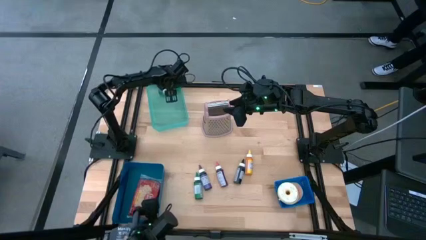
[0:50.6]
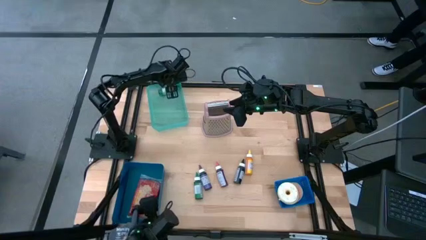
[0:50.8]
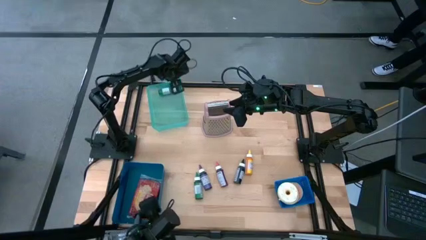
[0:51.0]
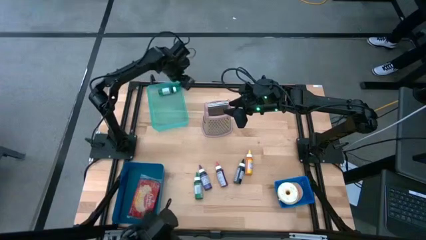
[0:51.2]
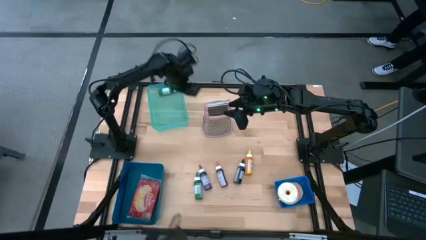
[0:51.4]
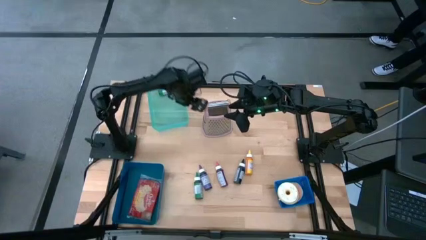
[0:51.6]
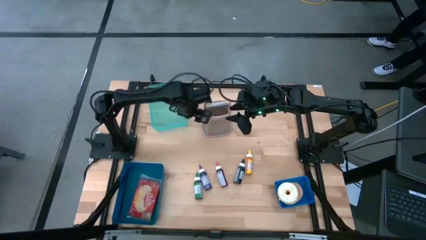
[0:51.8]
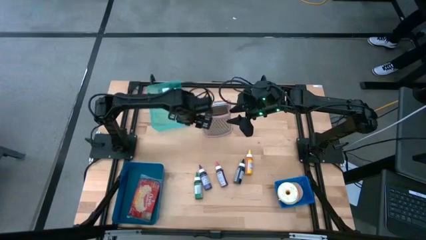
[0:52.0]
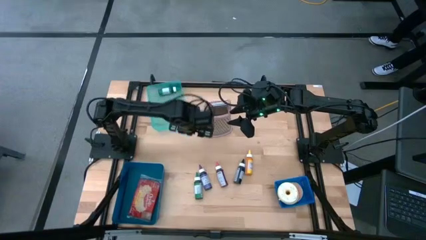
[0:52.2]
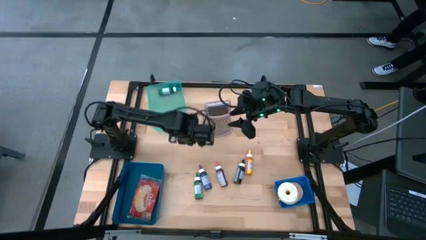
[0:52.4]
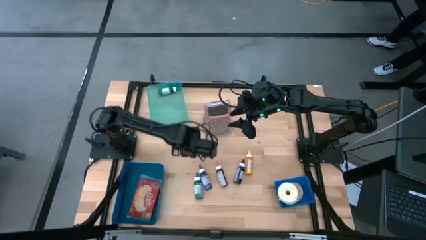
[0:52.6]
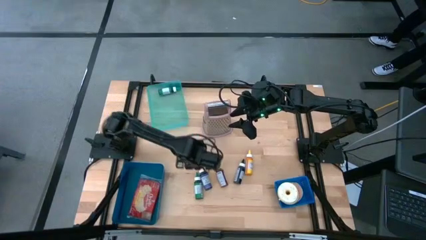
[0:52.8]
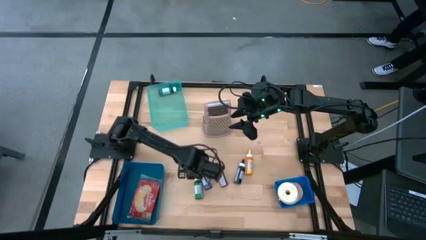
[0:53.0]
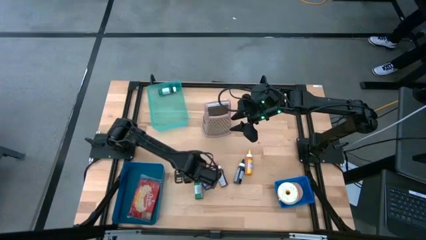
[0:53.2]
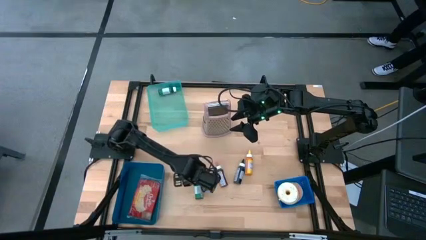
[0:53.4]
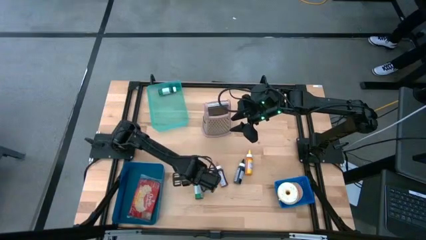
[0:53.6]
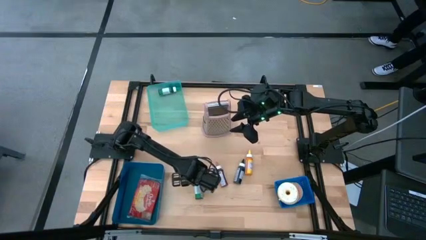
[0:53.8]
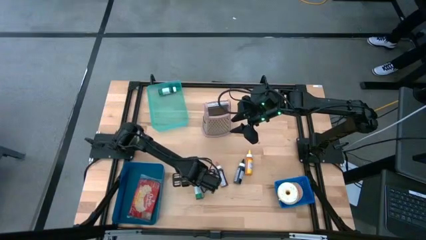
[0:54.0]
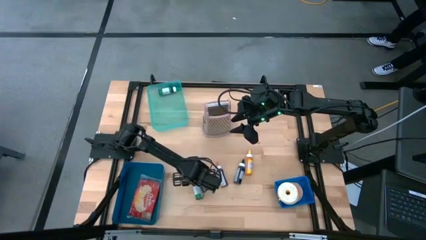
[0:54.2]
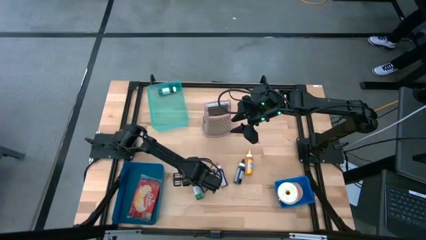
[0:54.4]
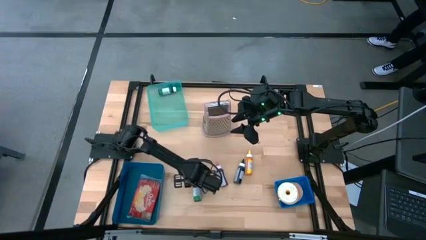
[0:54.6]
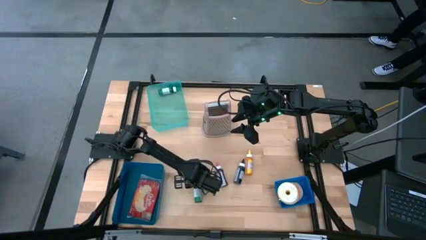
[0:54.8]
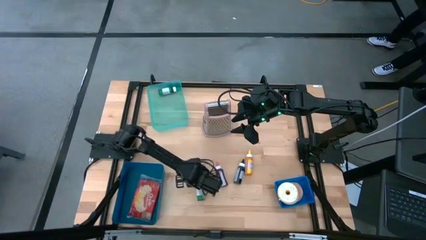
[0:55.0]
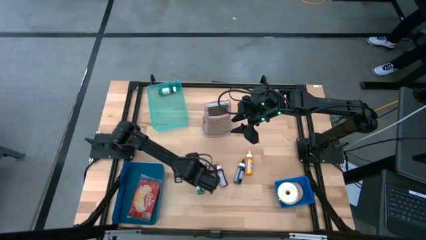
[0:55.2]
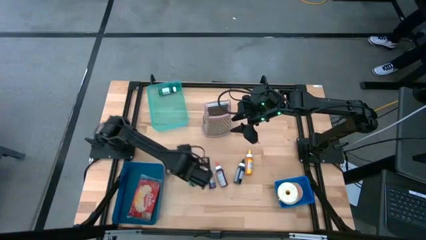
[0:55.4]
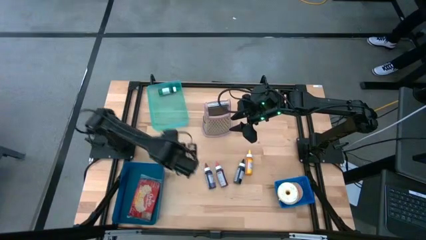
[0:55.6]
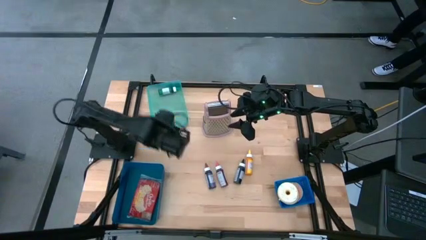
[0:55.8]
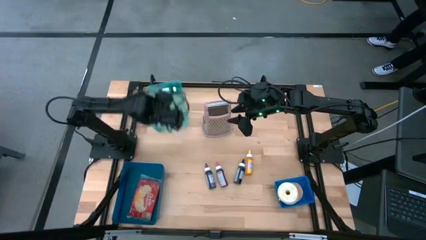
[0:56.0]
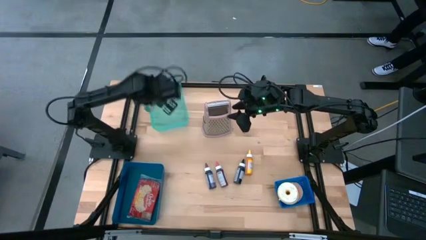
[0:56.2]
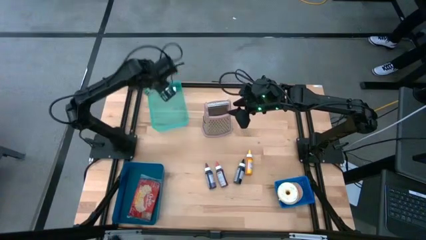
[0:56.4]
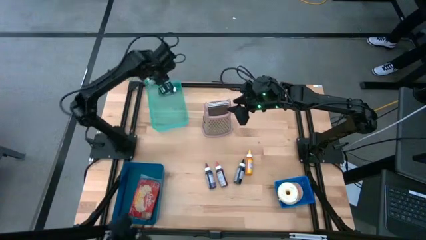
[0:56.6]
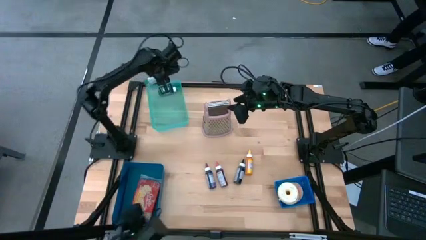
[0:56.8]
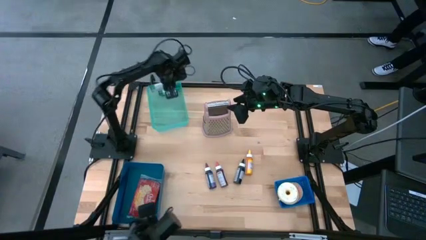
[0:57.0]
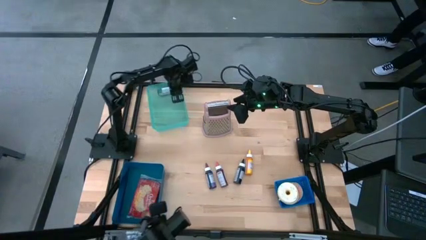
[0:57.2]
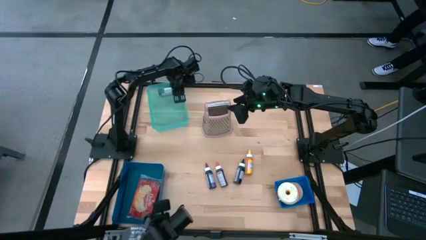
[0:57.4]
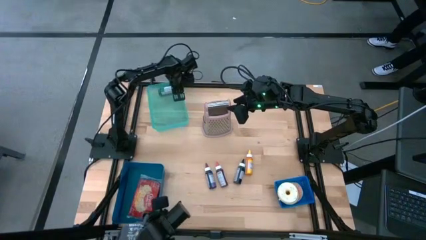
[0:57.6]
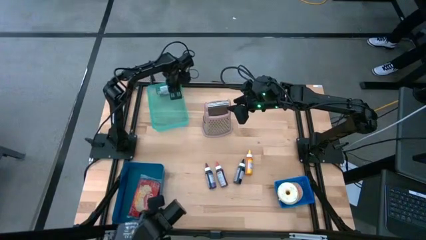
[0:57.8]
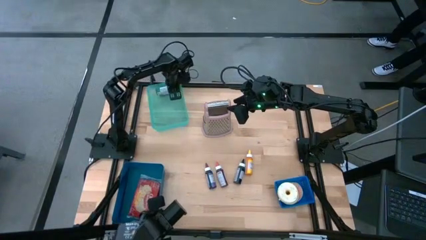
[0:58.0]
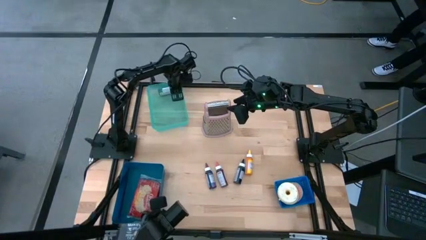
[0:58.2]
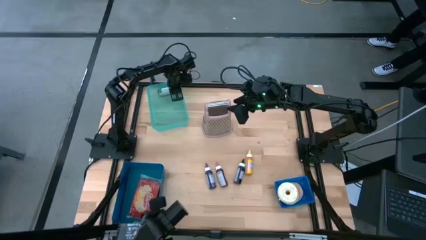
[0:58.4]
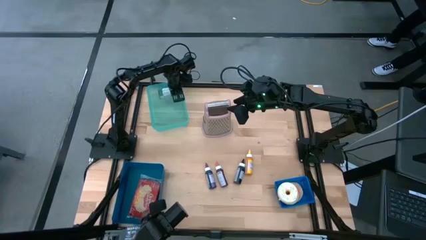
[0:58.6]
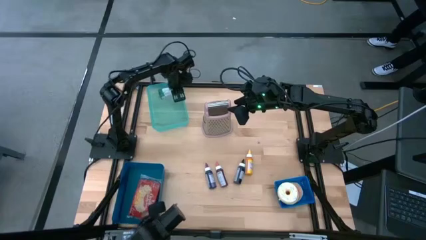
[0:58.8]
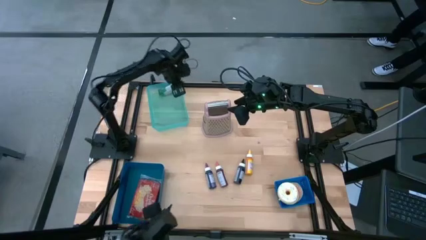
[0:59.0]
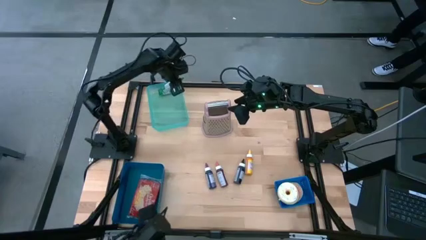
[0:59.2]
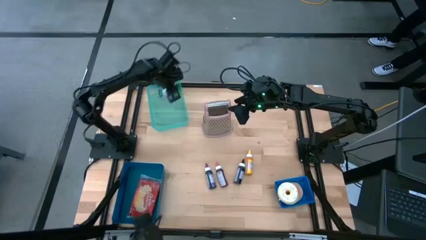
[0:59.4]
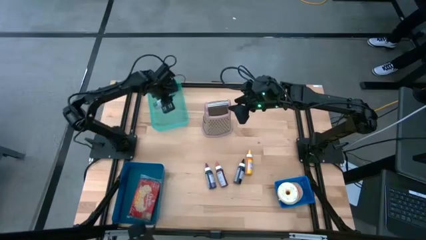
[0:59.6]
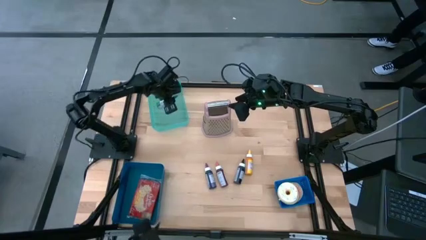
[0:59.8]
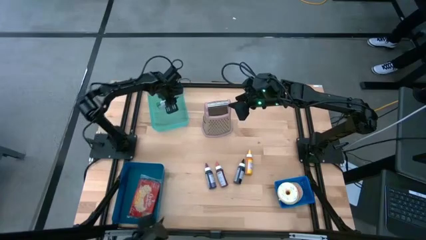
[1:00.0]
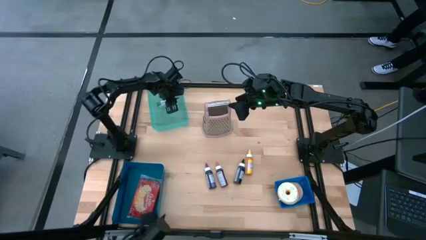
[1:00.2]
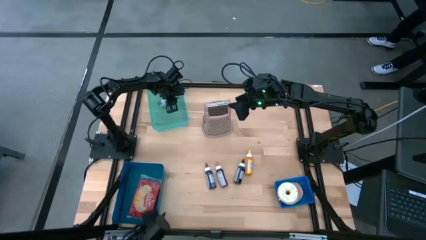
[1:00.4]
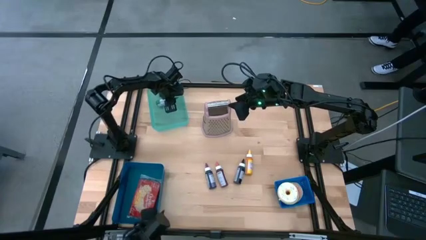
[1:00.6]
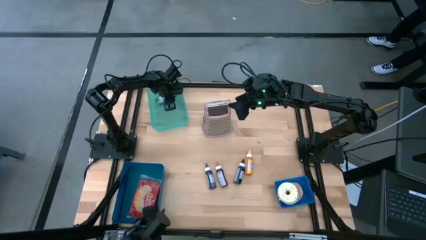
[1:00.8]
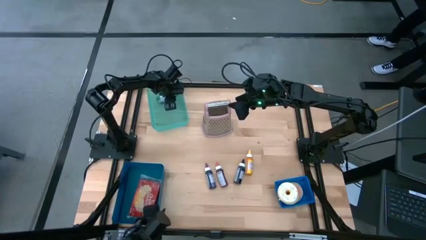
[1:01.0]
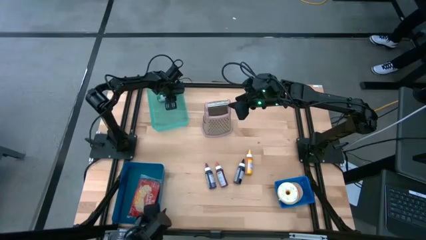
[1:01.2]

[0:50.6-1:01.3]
Put the green food coloring into the green bin

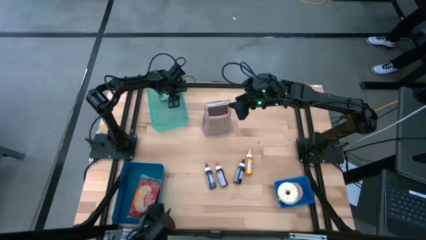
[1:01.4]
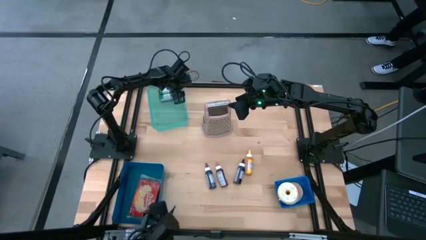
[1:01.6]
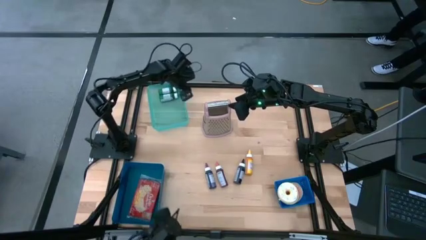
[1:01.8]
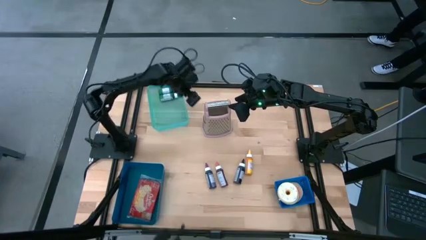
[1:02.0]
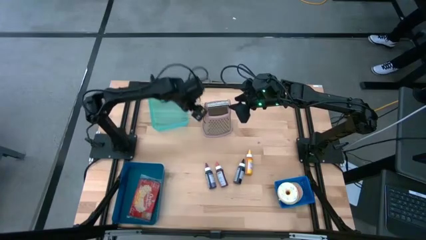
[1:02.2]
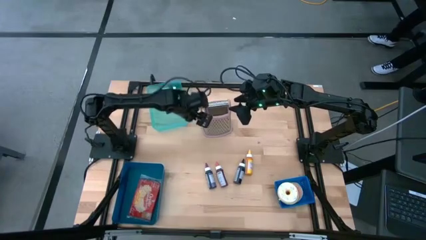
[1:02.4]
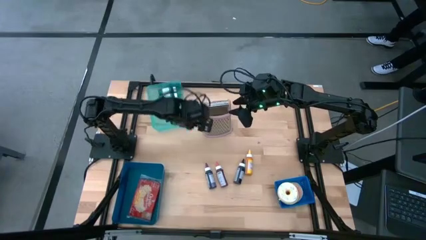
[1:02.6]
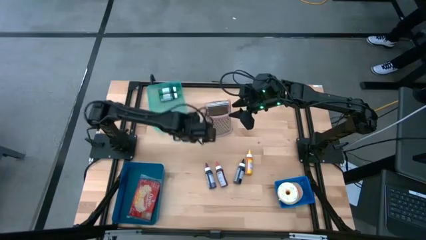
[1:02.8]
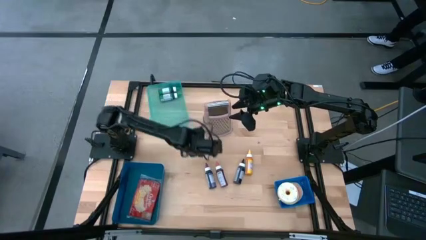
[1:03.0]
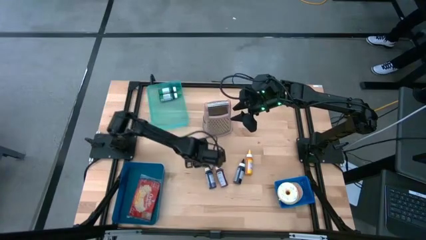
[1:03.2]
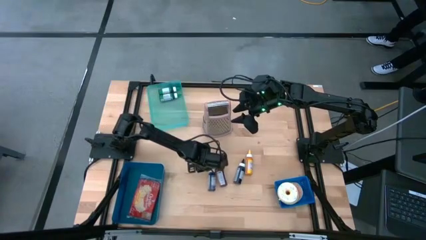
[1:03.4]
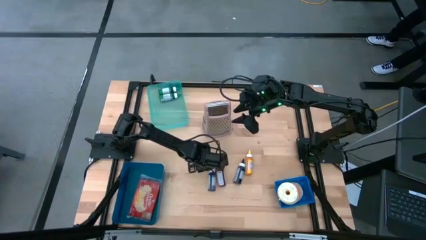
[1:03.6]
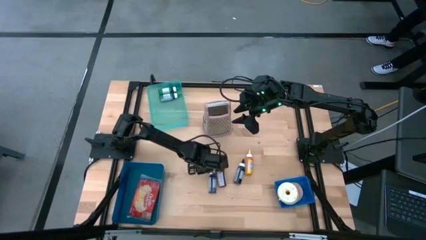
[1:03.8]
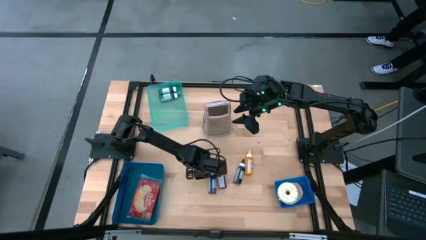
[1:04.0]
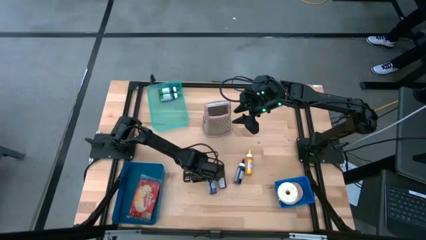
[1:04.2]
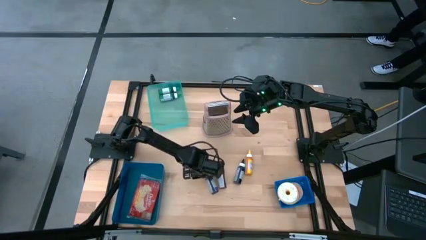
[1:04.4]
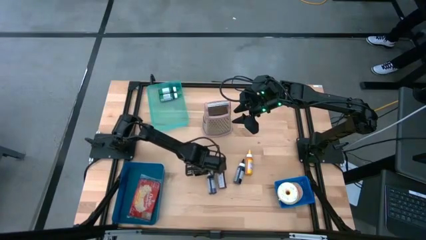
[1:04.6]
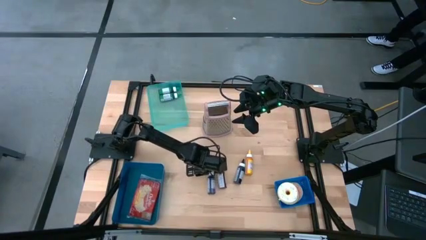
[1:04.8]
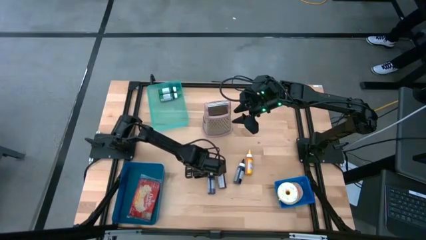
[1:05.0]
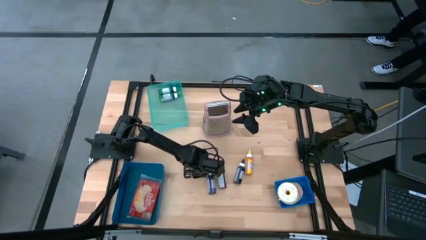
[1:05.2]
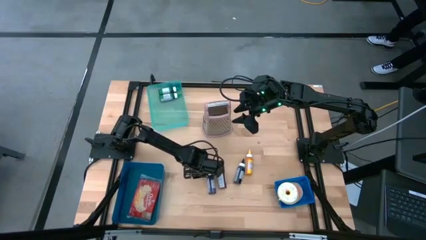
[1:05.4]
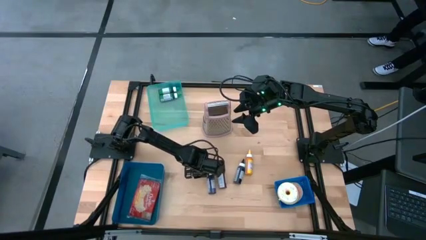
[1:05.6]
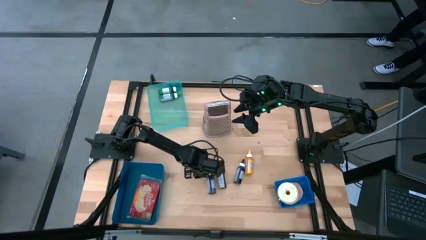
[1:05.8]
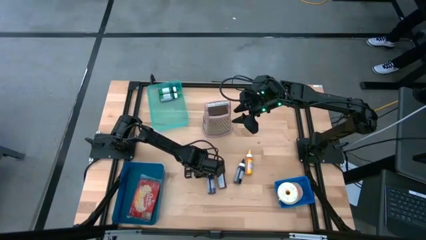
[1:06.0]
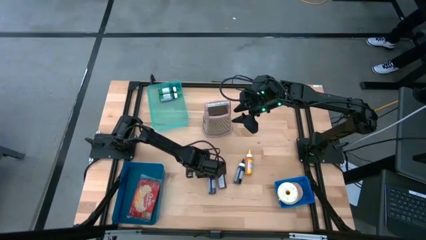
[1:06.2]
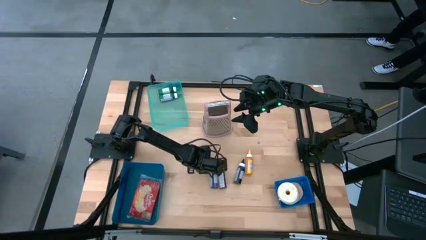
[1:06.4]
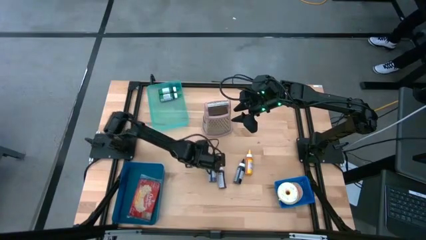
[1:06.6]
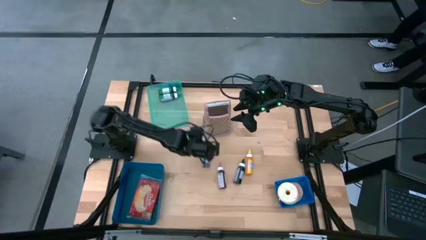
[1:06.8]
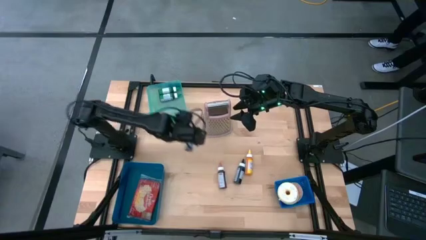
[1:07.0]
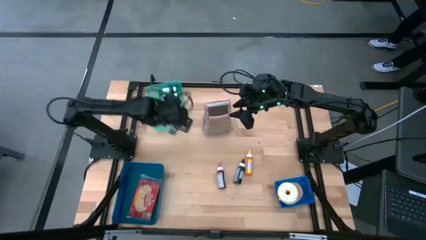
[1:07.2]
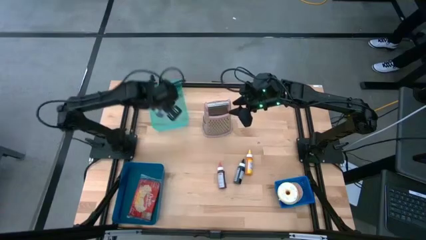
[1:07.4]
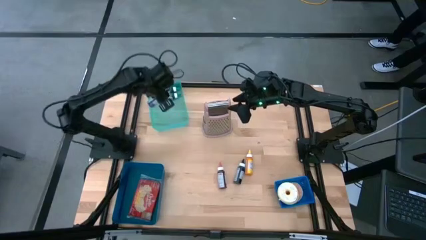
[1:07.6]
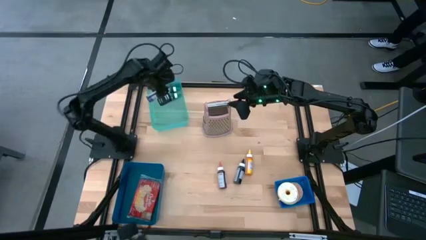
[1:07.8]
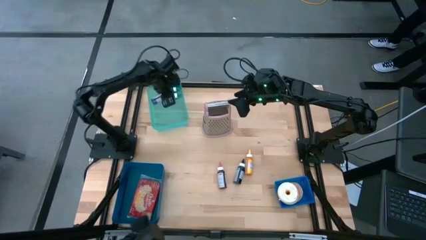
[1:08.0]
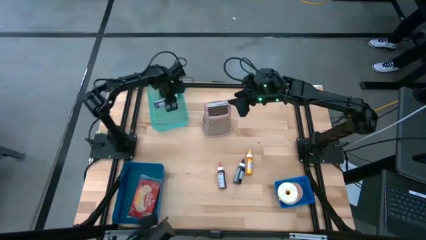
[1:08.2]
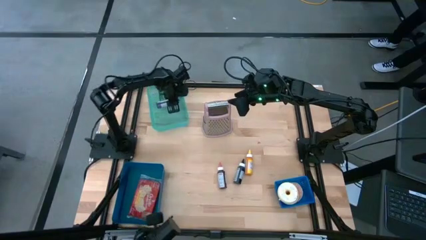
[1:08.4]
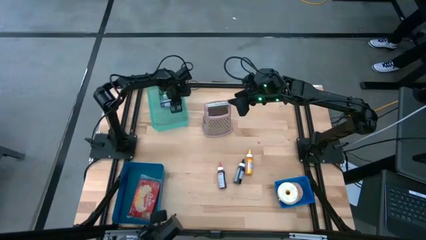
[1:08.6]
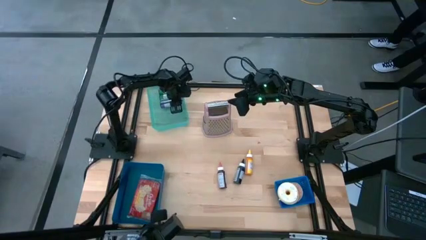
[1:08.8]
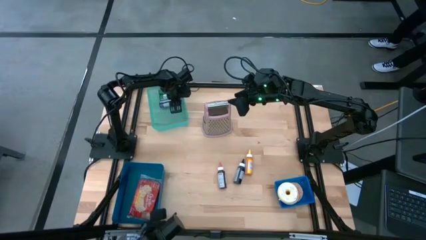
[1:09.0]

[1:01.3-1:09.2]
Put the violet food coloring into the green bin
